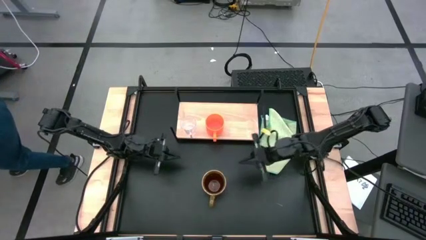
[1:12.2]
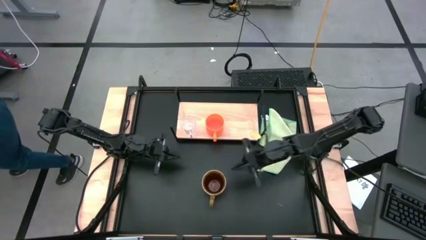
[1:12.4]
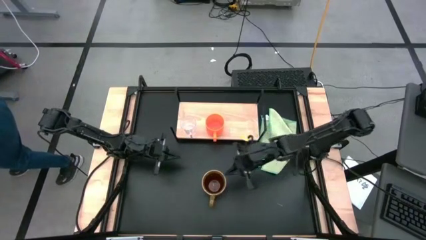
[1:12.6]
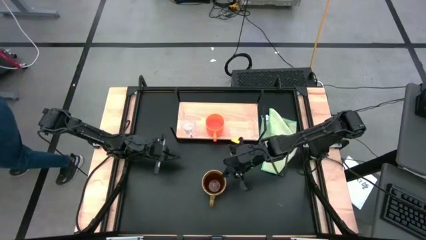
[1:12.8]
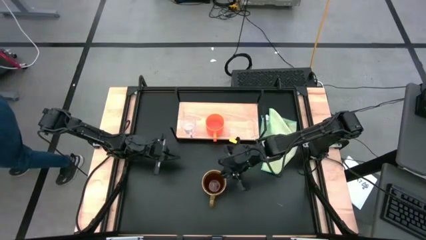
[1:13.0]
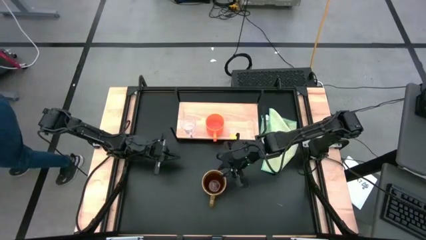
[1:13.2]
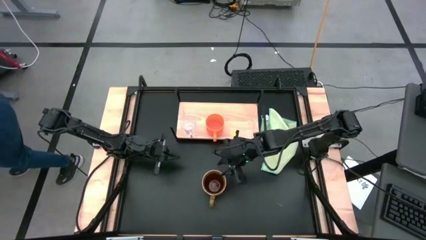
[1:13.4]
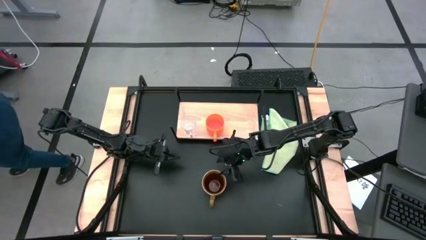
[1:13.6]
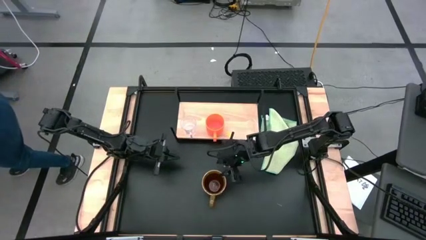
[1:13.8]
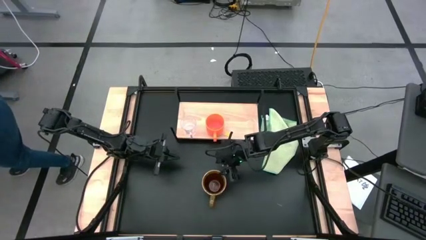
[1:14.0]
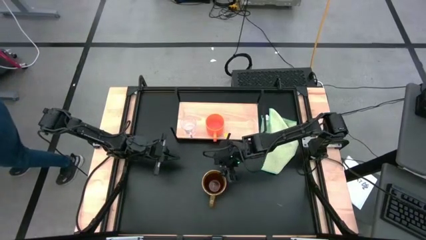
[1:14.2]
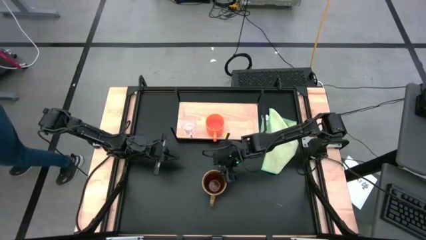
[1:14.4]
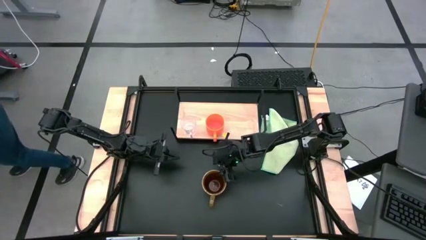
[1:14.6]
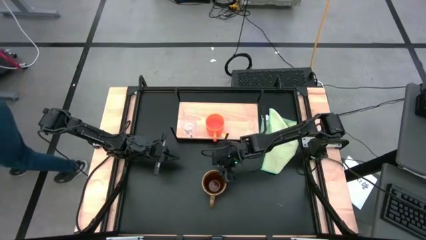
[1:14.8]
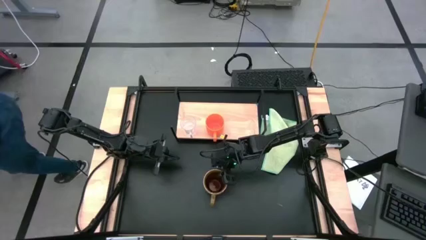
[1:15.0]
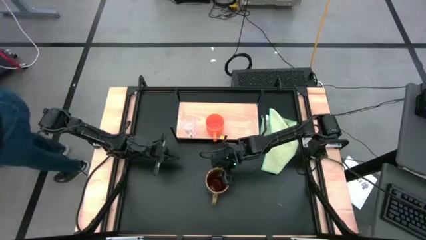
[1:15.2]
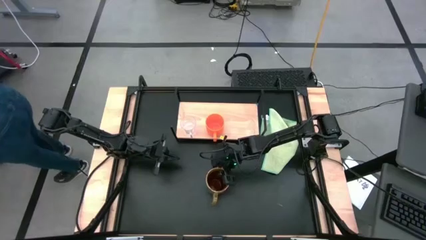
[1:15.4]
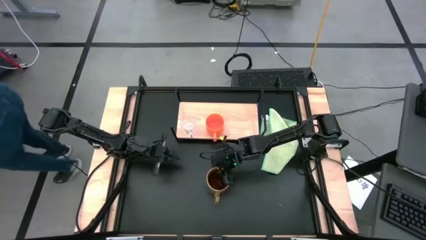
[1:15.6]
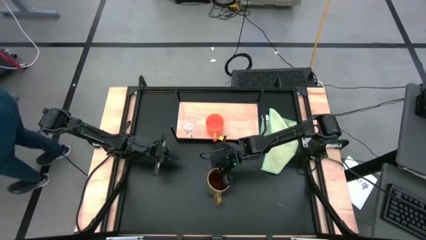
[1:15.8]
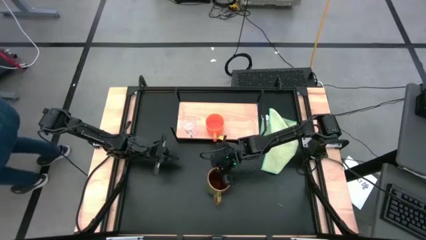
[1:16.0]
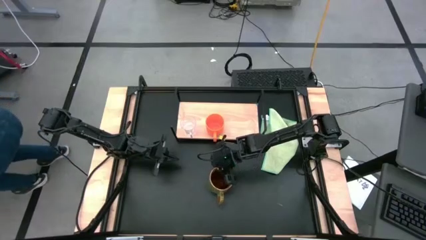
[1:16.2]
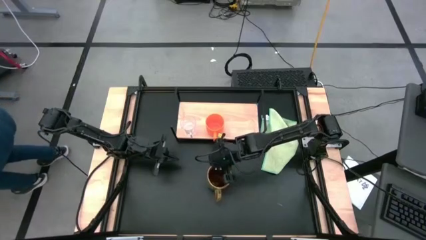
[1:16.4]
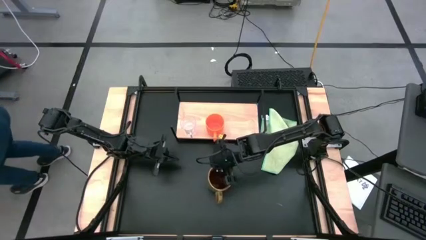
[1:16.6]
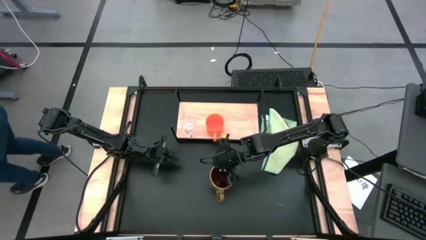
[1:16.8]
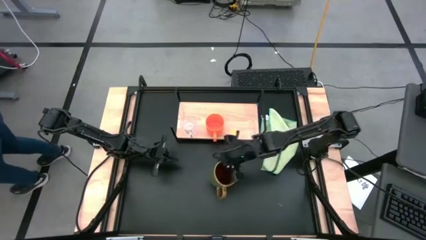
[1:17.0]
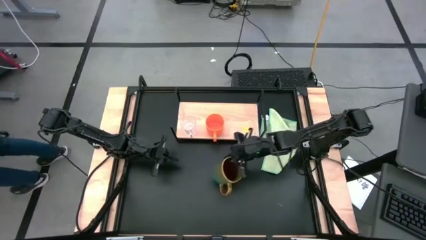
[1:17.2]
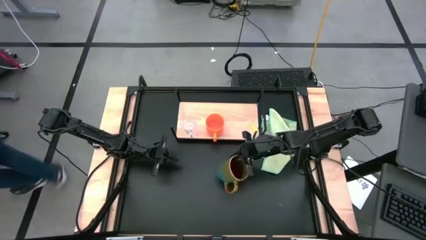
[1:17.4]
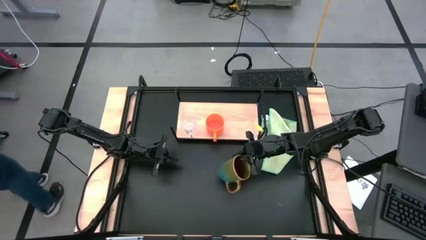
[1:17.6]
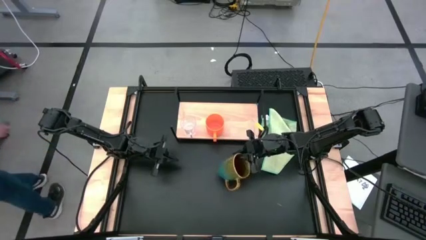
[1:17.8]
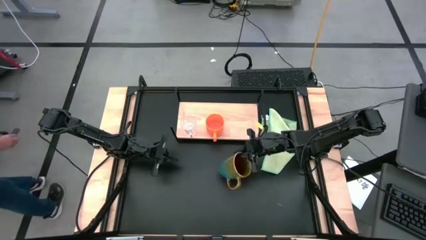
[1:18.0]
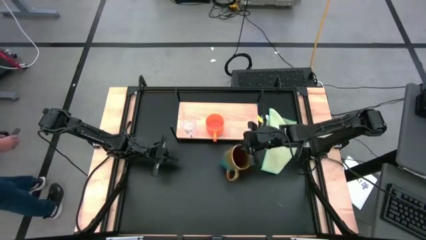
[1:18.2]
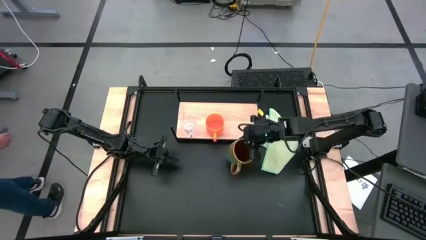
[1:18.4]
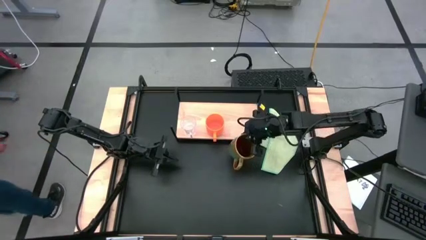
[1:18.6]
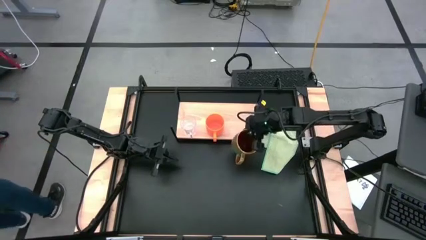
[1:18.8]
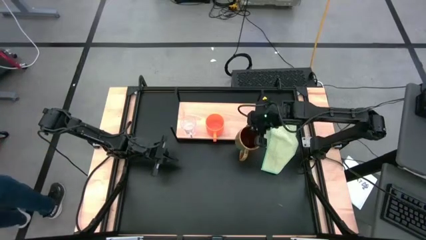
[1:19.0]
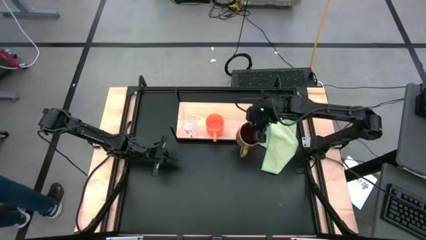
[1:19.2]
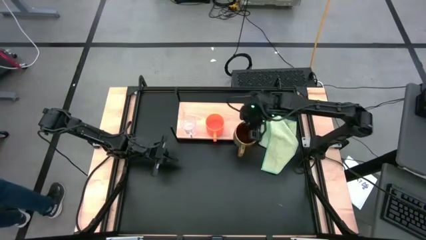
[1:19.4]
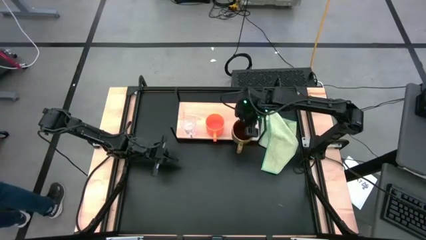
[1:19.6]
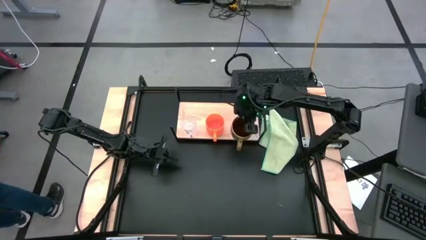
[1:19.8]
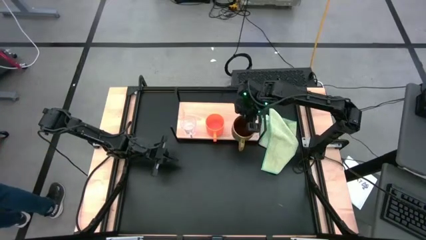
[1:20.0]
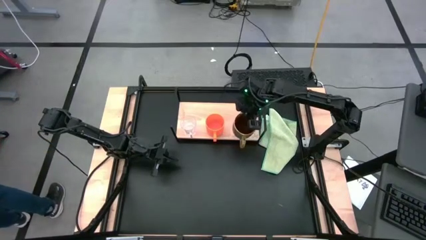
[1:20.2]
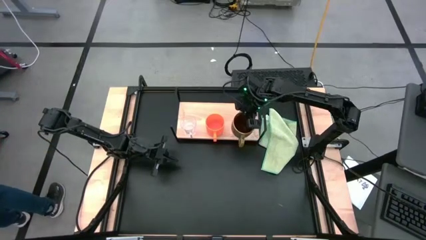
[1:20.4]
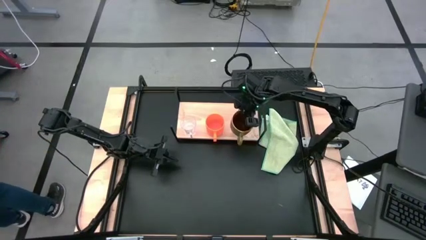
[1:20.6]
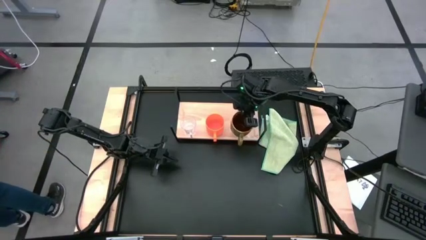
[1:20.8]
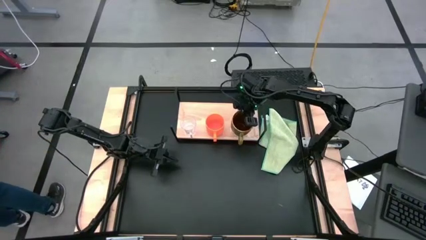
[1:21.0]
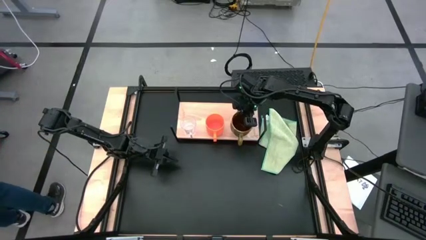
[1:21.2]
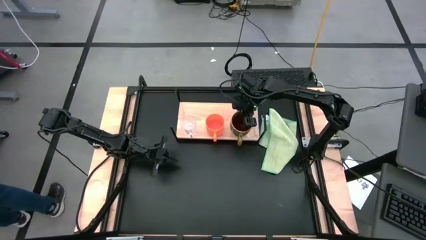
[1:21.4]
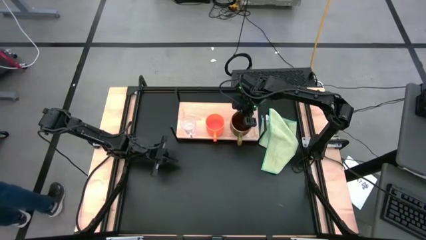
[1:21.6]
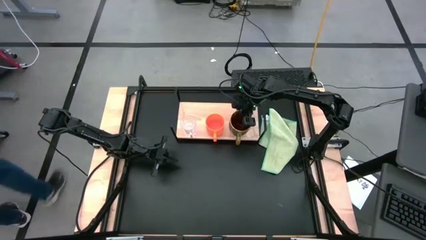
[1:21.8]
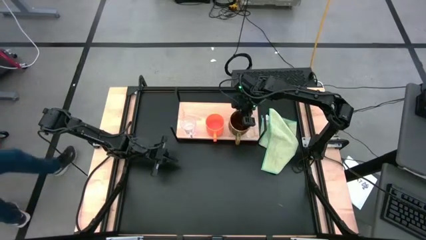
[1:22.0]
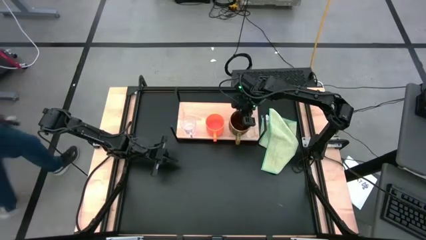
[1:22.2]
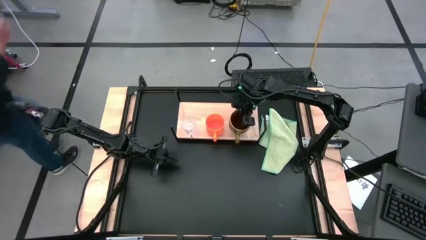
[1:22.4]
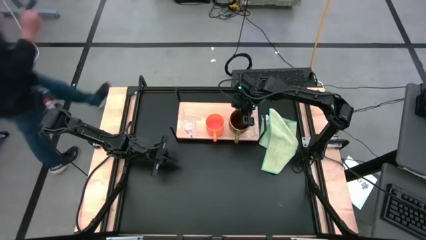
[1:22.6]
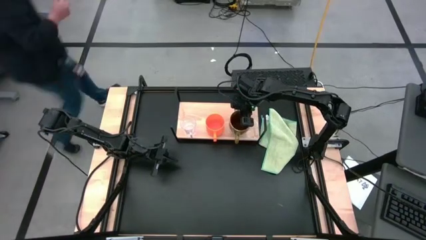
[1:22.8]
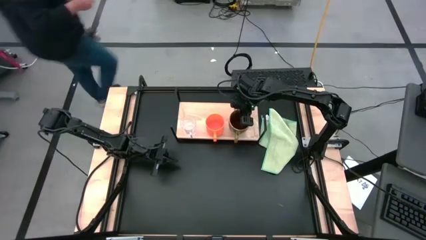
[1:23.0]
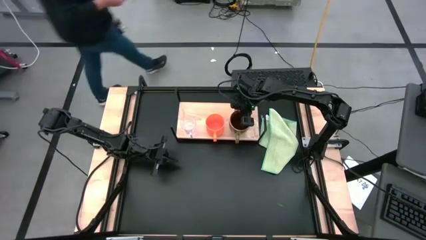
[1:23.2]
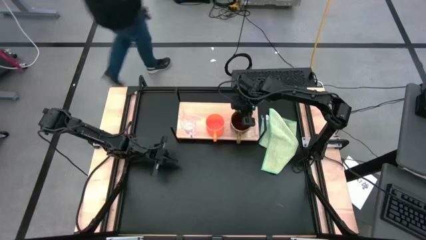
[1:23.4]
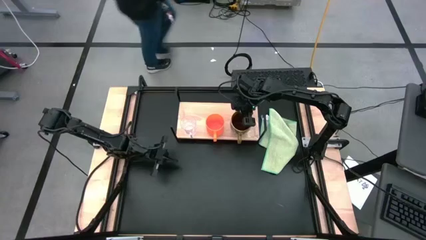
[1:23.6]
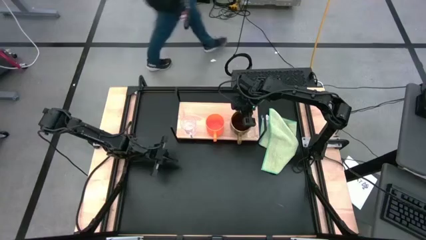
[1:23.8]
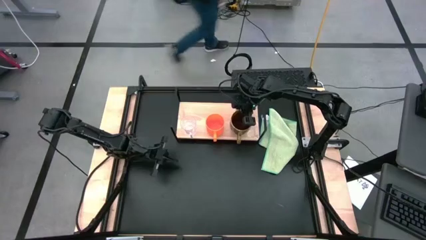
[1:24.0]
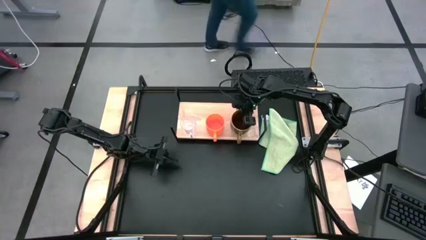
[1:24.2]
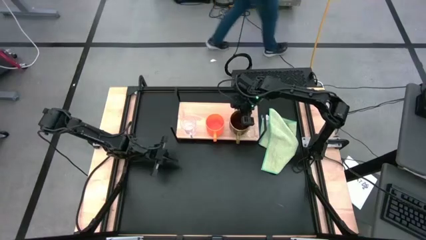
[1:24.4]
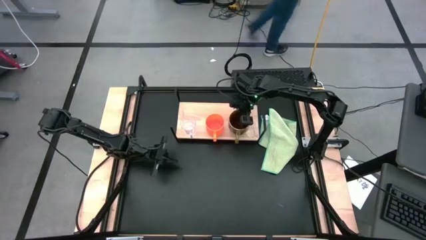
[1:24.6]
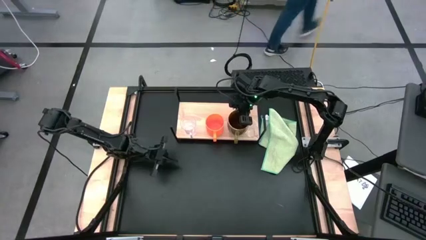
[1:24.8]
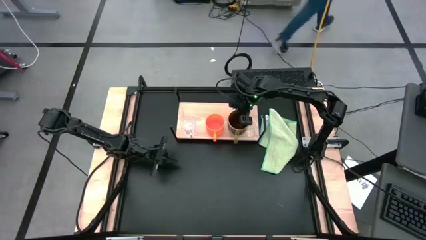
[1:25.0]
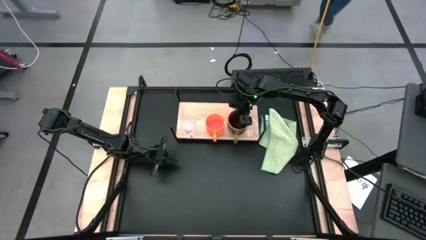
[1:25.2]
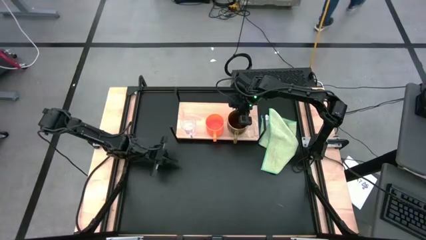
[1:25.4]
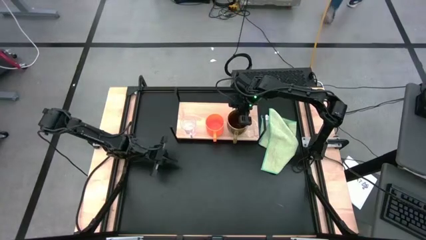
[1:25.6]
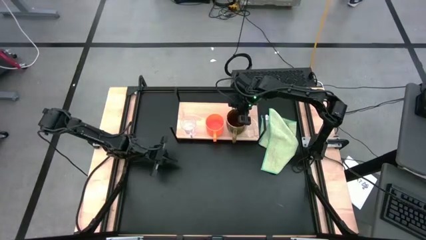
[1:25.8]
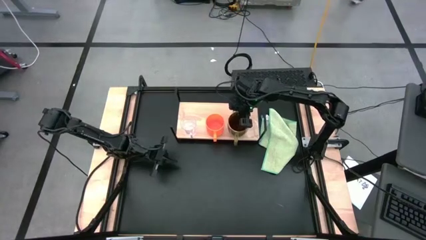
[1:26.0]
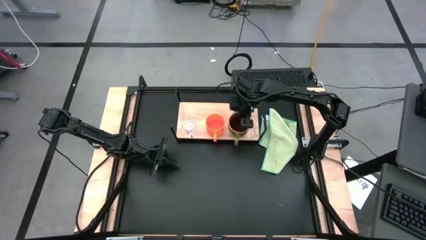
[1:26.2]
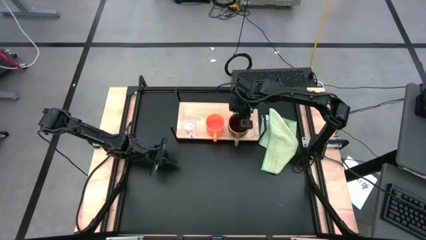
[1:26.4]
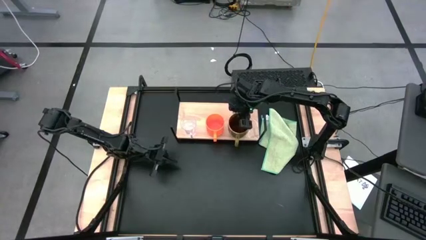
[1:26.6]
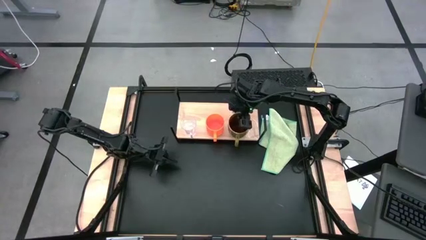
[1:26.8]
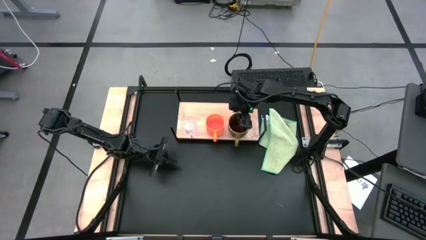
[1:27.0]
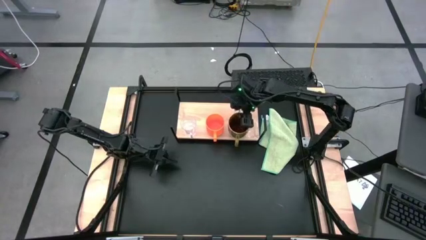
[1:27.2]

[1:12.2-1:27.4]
Task: Stack small to large cups/mugs on shelf
Put the green mug on the shelf
